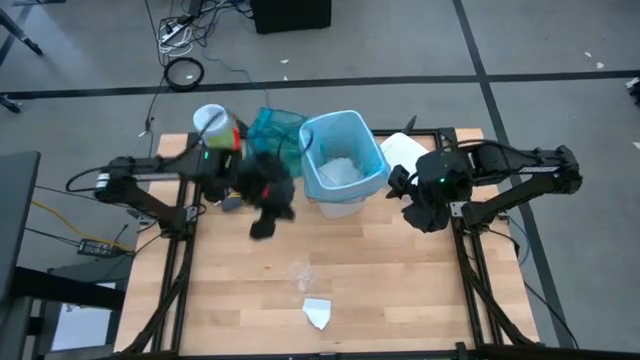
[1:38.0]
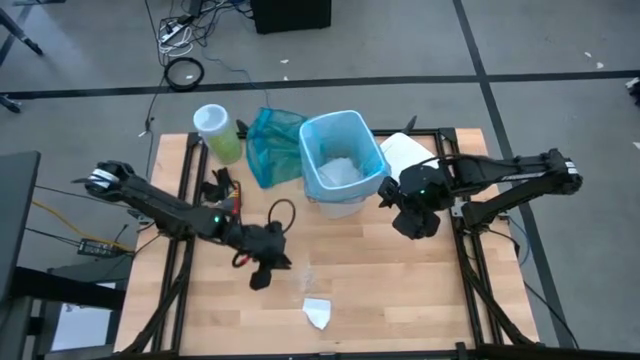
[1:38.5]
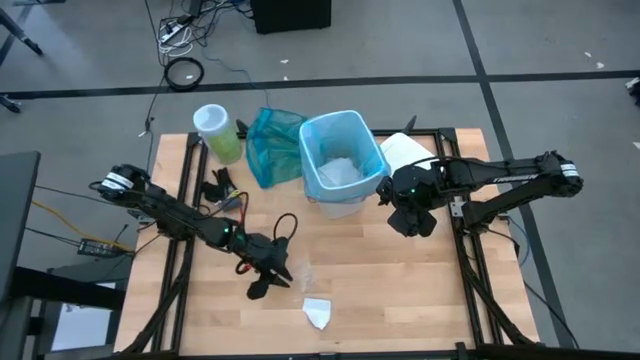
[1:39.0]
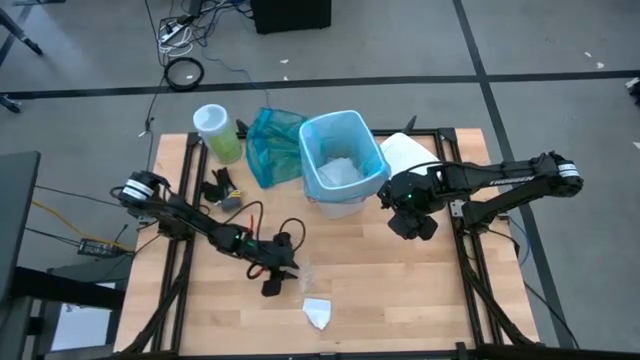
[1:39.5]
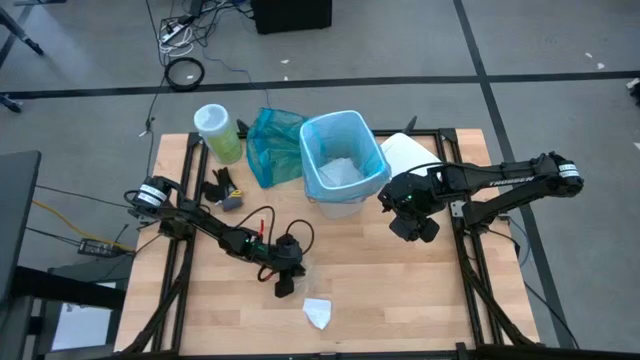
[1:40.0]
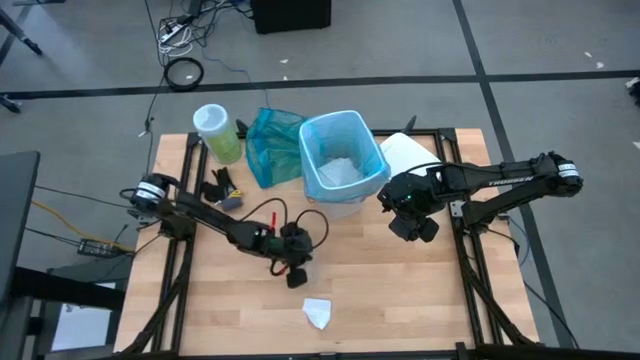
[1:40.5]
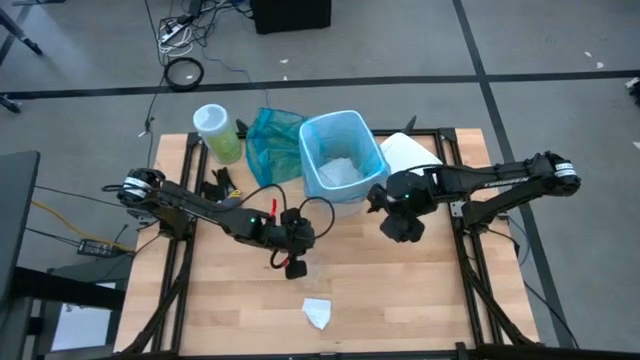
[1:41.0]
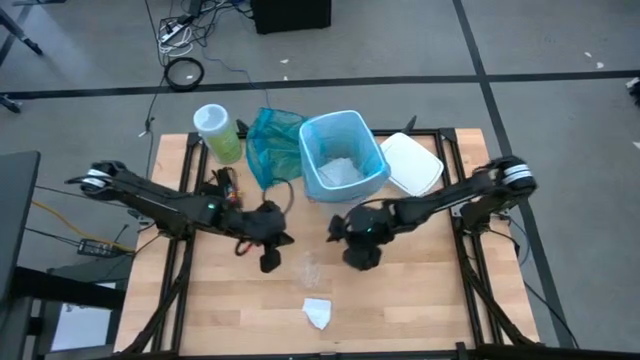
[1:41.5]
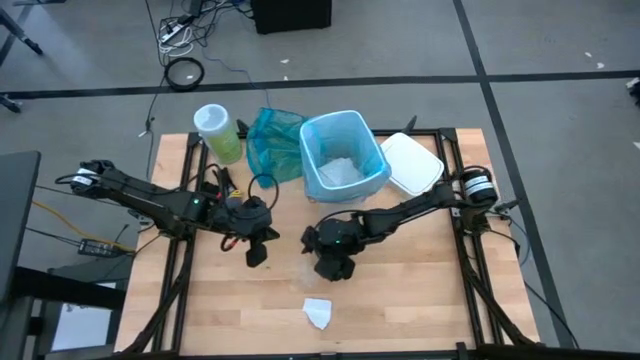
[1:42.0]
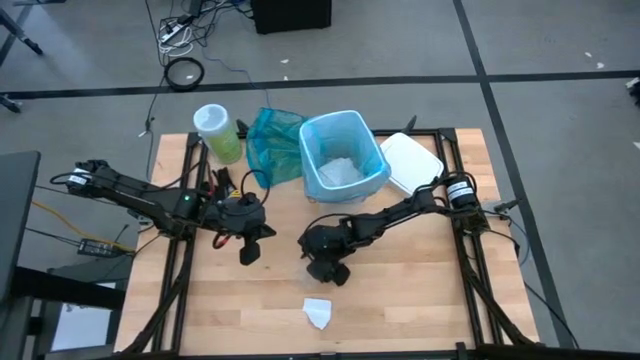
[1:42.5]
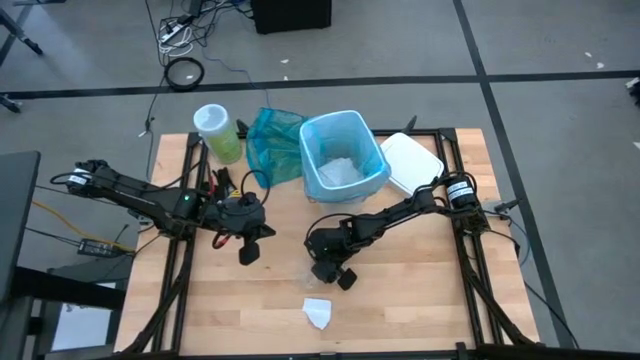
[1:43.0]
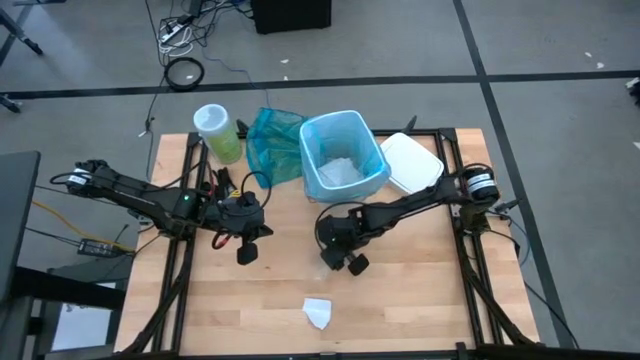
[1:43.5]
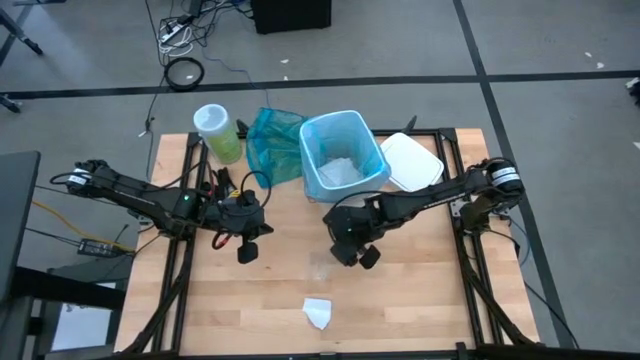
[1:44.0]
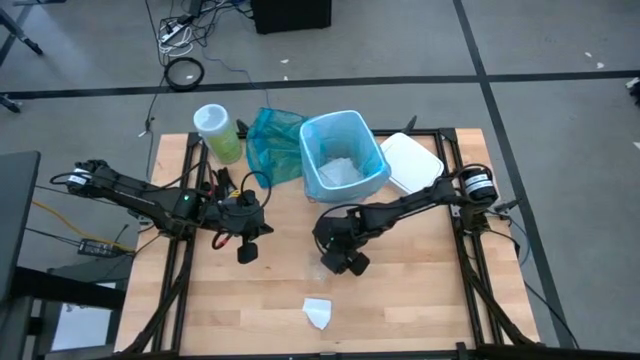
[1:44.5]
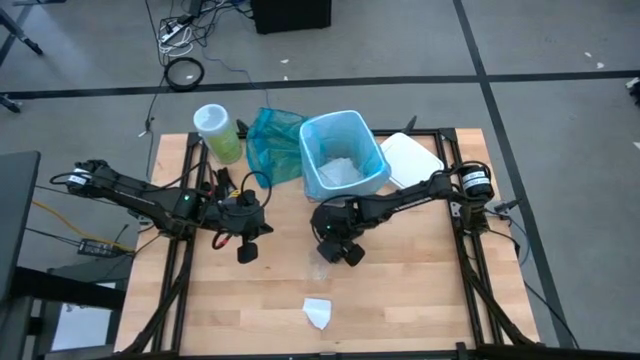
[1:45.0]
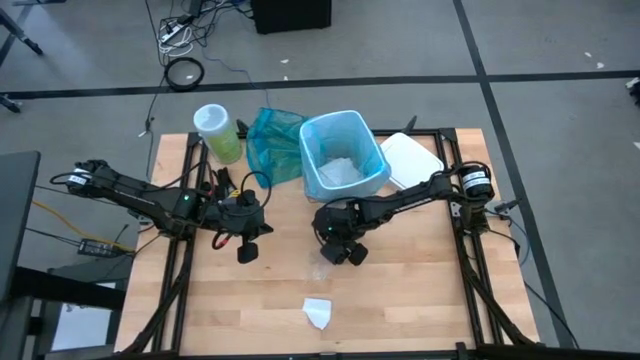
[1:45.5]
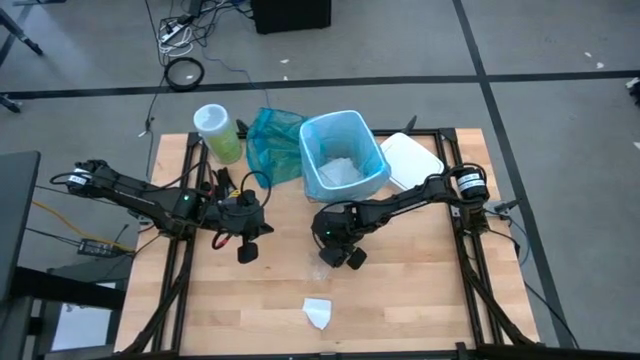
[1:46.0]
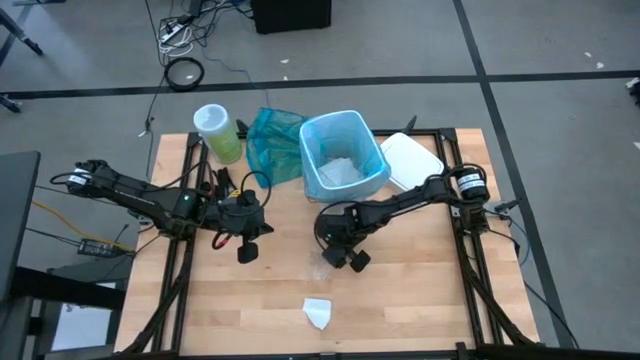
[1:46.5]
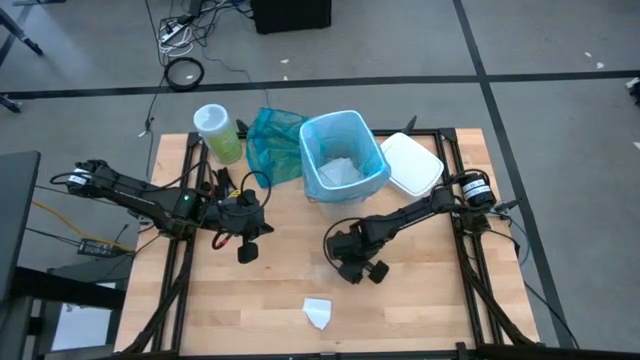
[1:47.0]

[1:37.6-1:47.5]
Task: place trash/remove bag and relplace
Put the clear plastic into the white trash bin

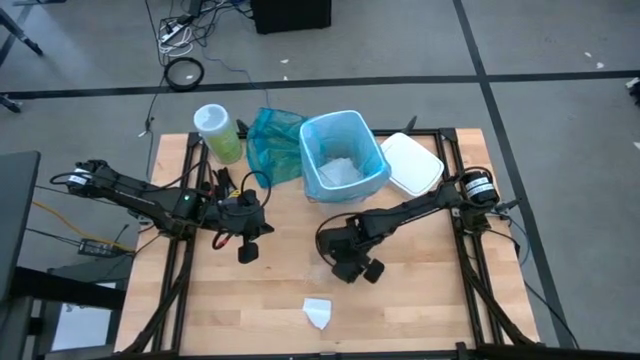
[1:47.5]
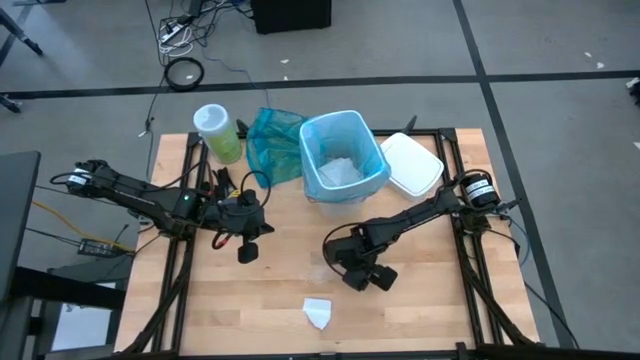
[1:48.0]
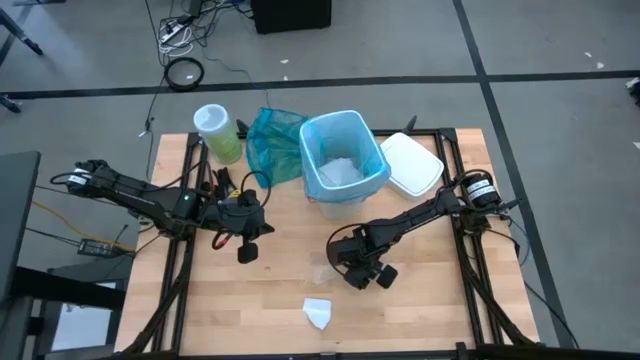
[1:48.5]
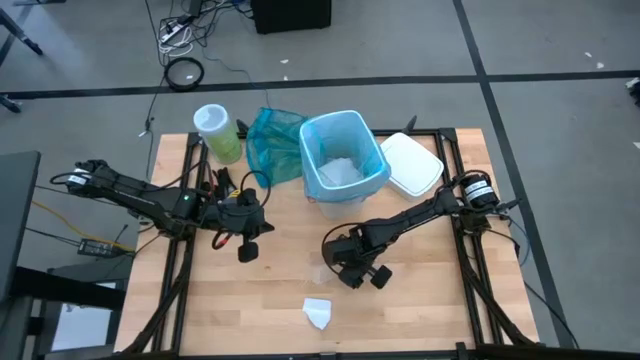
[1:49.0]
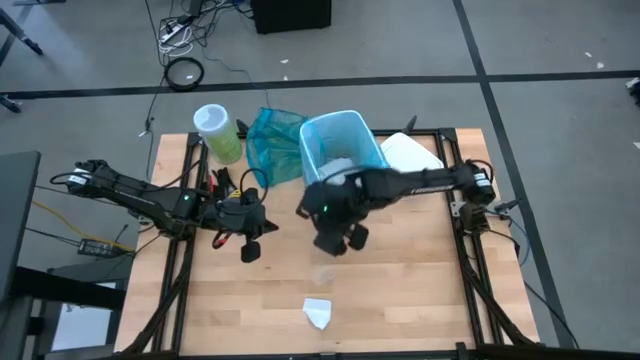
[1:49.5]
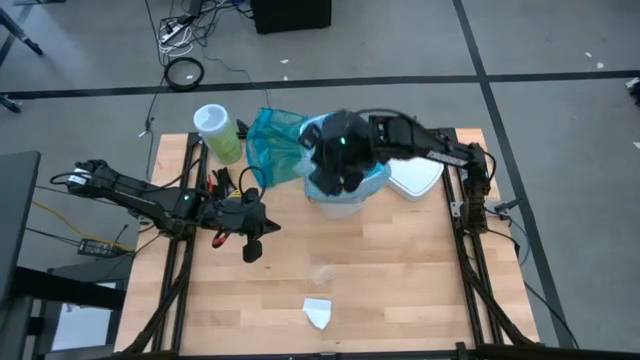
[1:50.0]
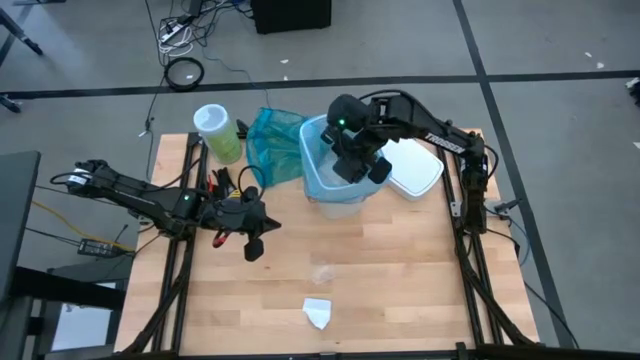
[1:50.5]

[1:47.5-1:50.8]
Put the clear plastic into the white trash bin

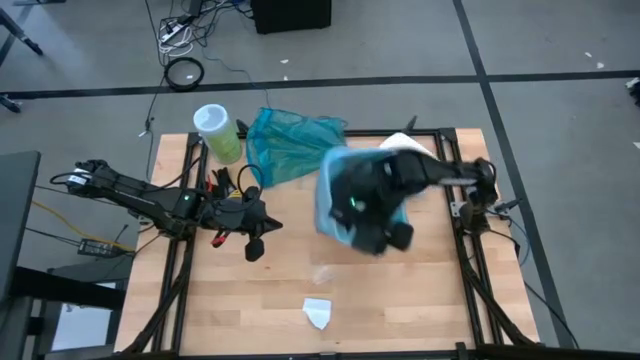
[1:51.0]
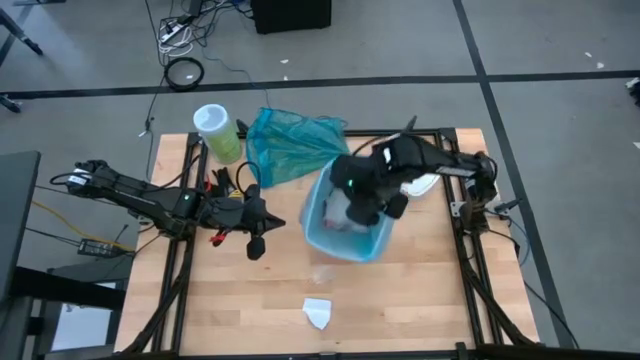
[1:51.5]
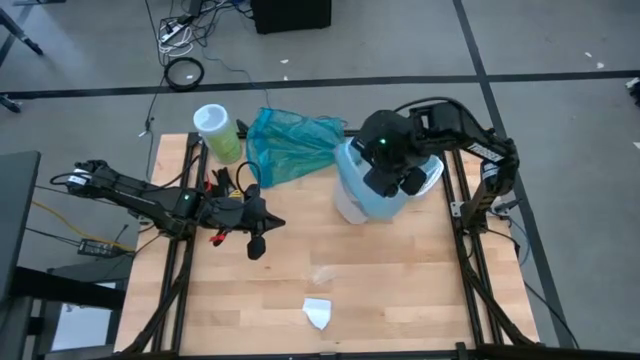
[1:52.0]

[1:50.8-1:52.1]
Put the clear plastic into the white trash bin

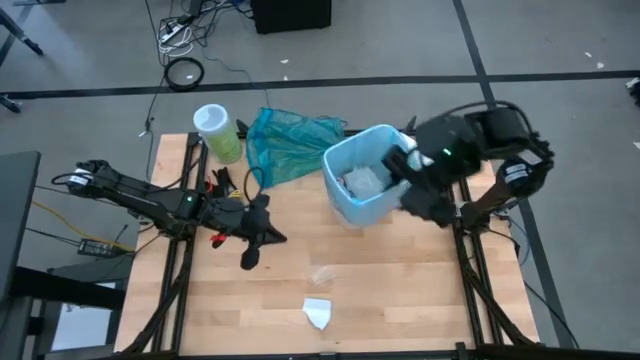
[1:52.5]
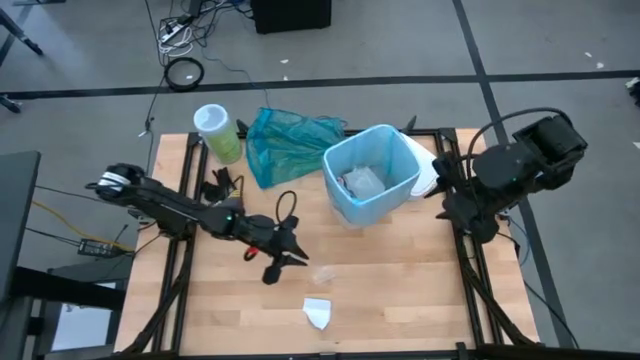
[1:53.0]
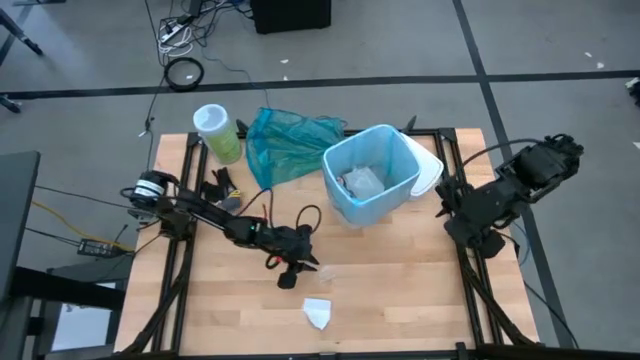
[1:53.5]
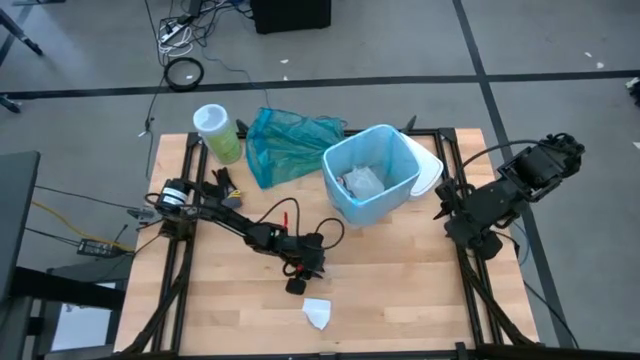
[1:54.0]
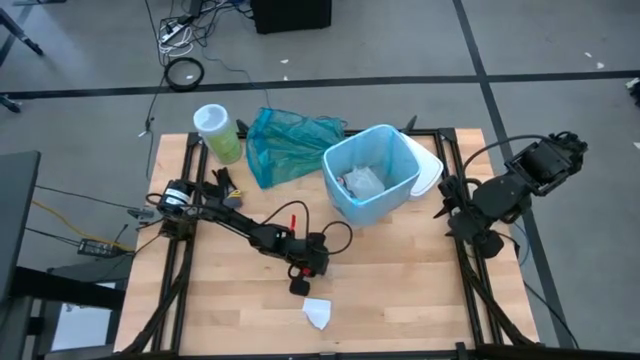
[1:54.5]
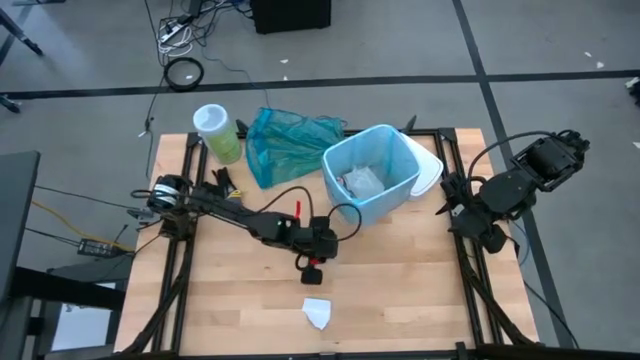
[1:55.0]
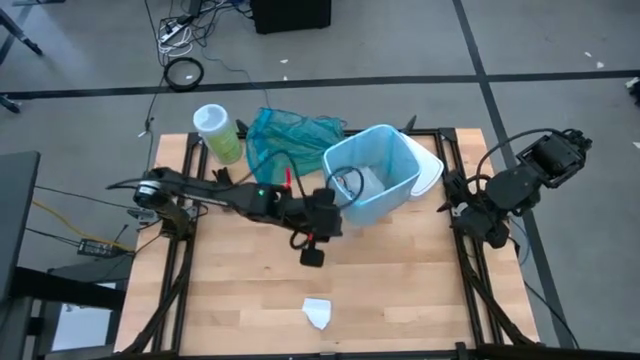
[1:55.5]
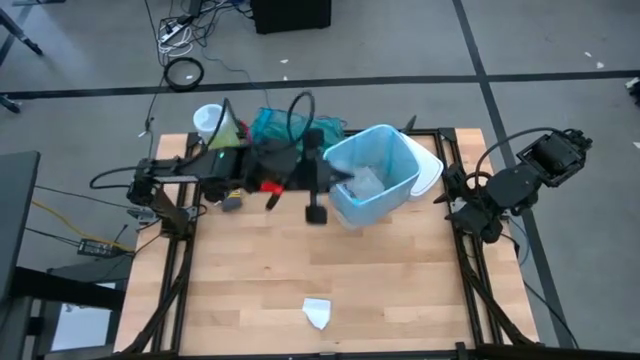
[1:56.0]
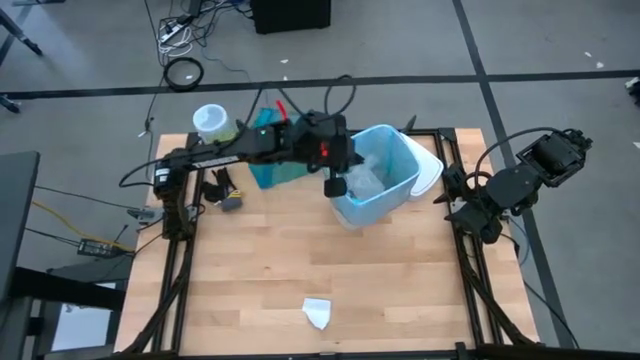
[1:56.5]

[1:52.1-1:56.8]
Put the clear plastic into the white trash bin

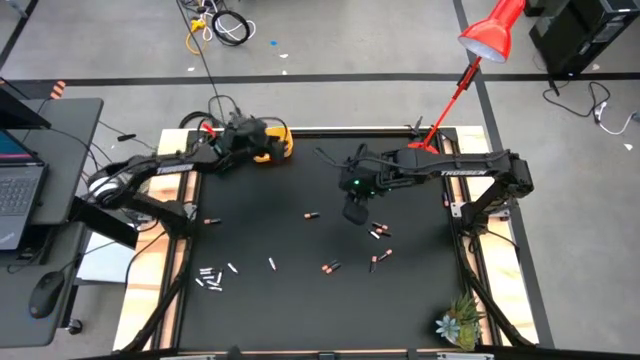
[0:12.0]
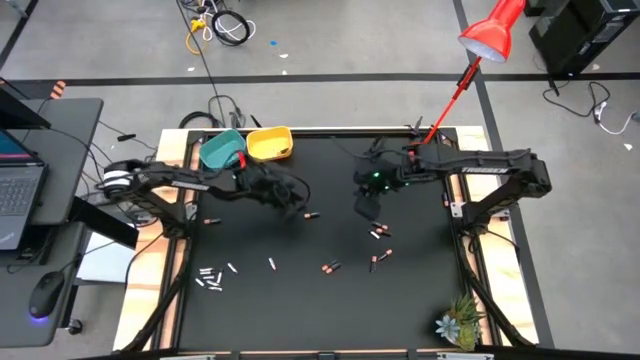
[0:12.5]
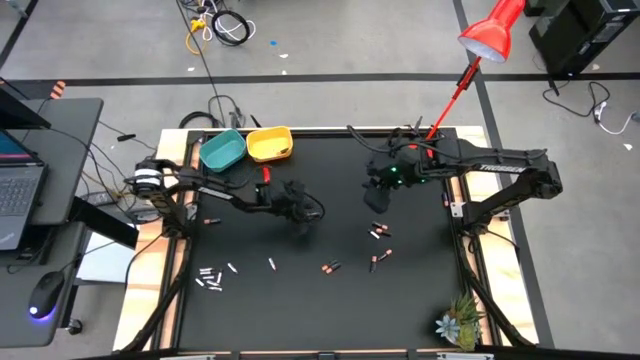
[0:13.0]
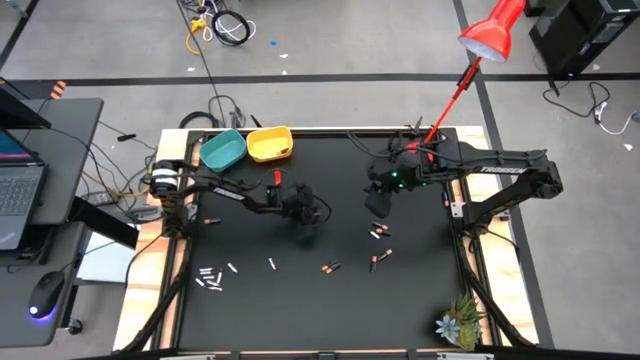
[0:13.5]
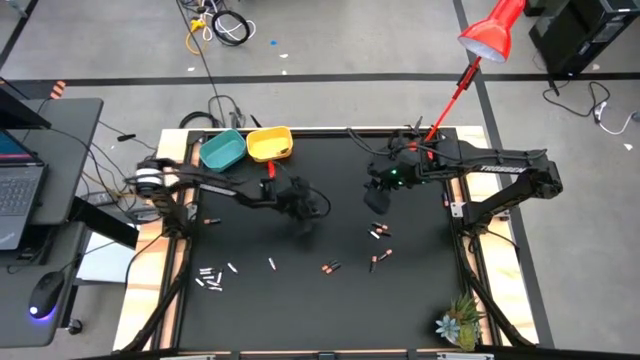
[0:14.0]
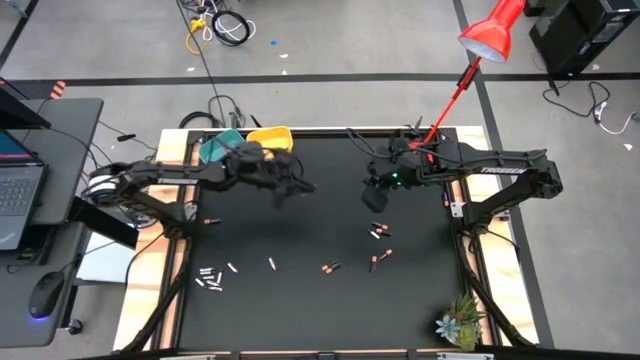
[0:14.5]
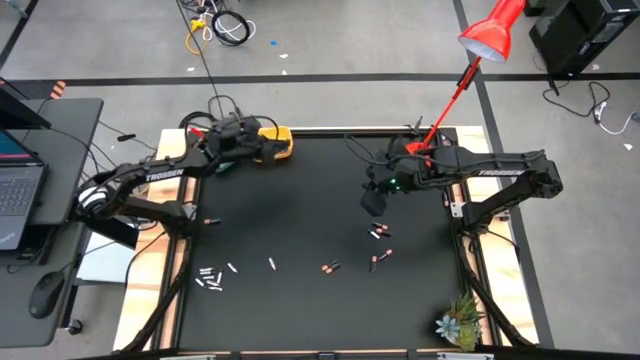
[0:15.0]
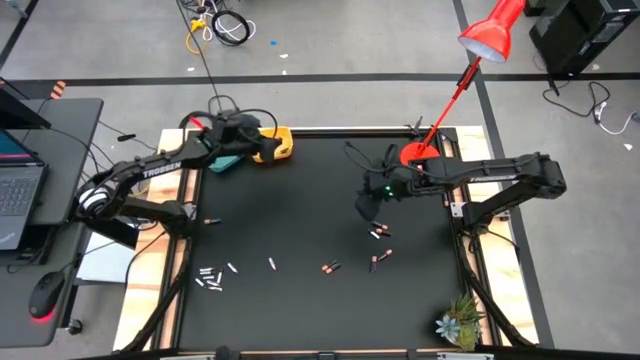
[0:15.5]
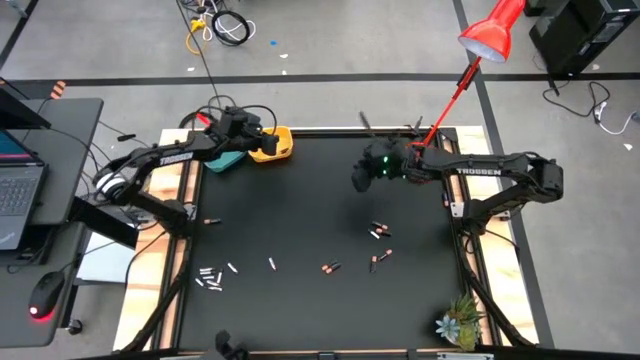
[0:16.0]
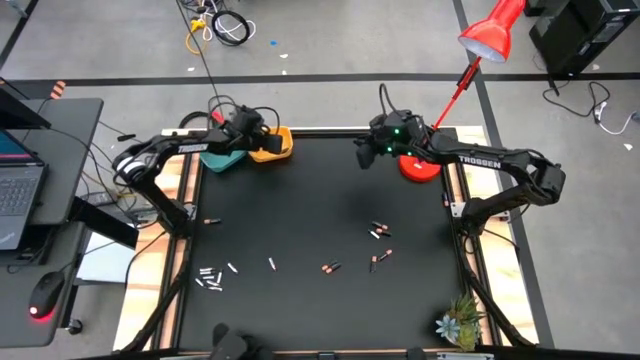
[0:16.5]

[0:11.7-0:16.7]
Task: Sort batteries
Put the black battery into the yellow bin
